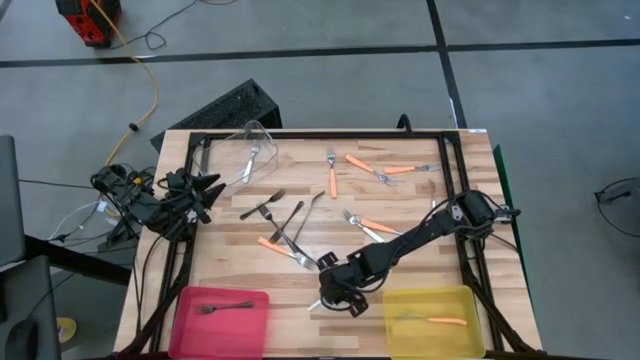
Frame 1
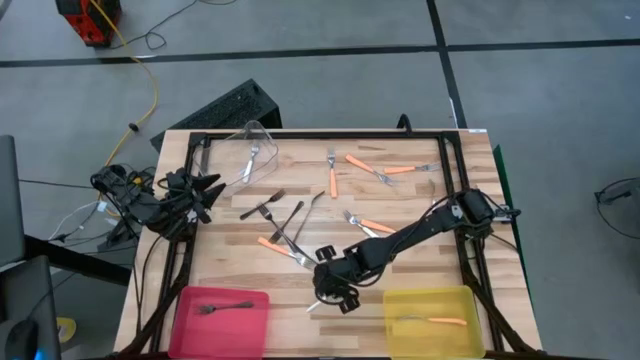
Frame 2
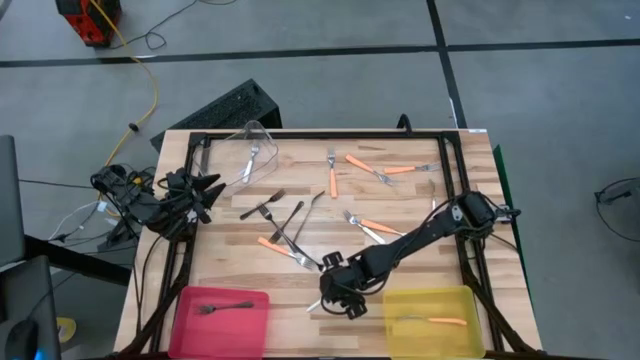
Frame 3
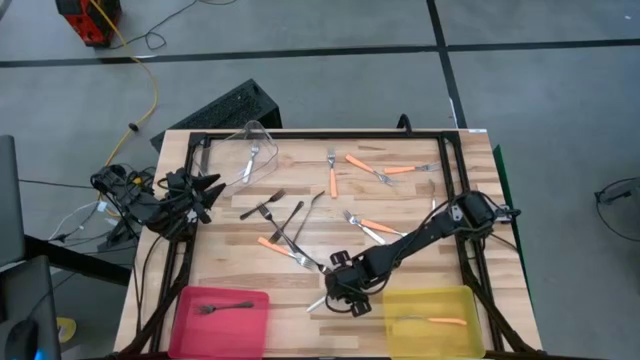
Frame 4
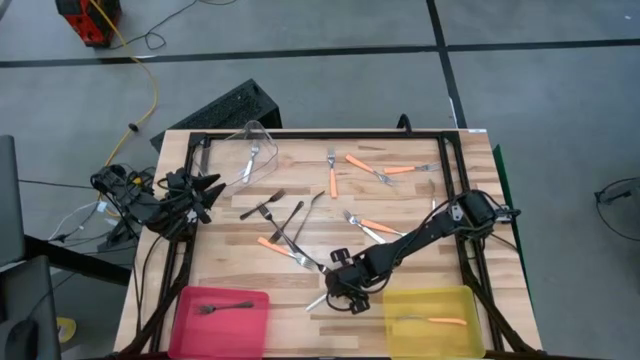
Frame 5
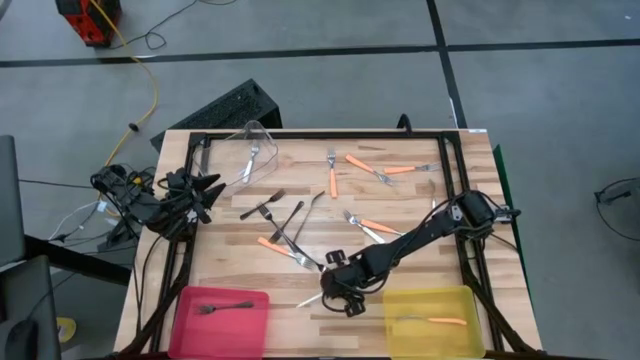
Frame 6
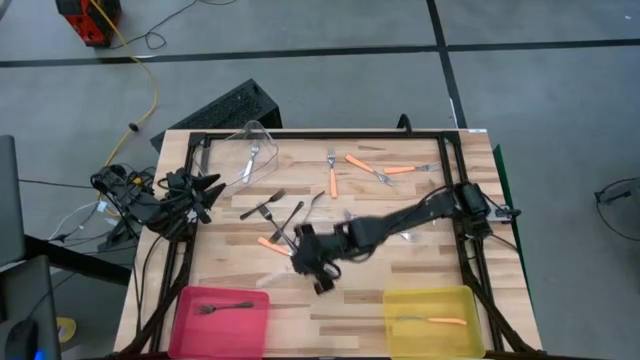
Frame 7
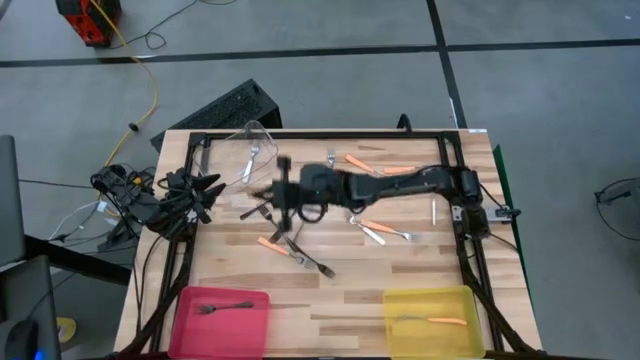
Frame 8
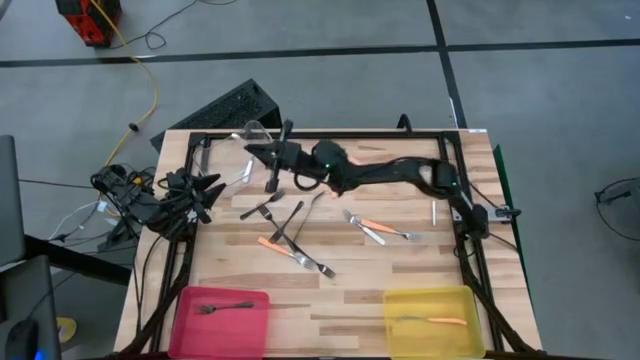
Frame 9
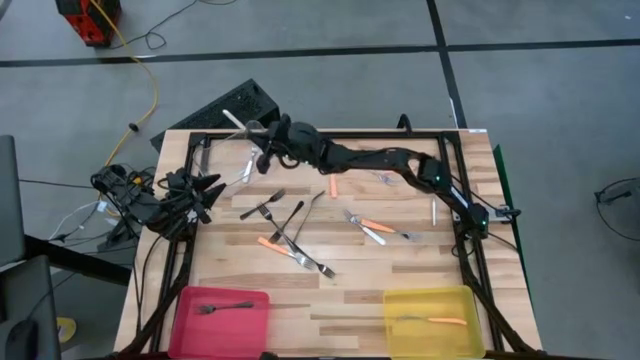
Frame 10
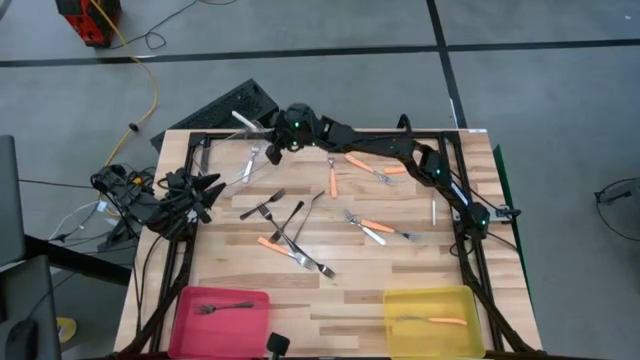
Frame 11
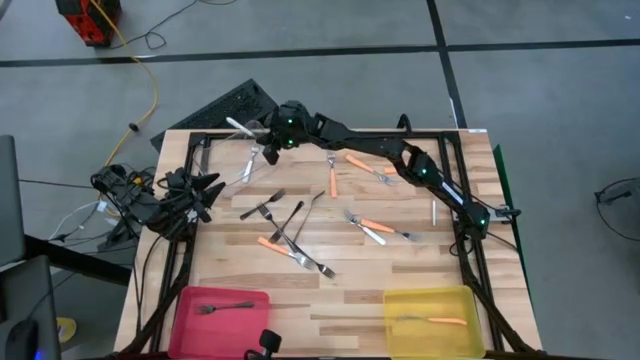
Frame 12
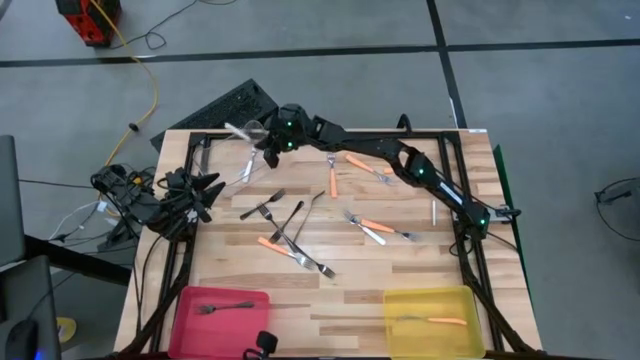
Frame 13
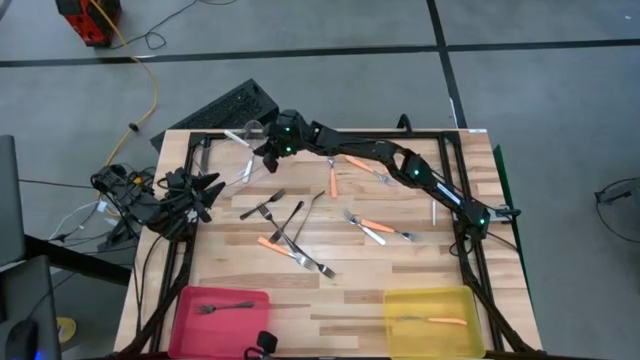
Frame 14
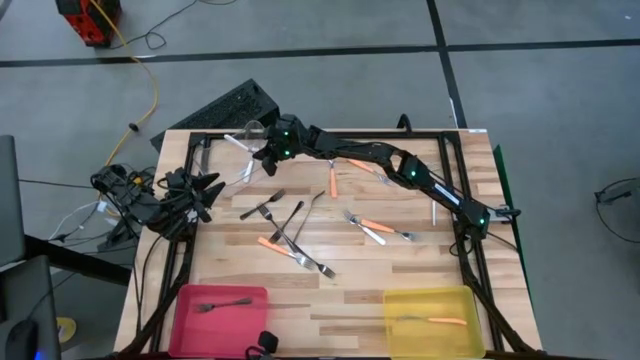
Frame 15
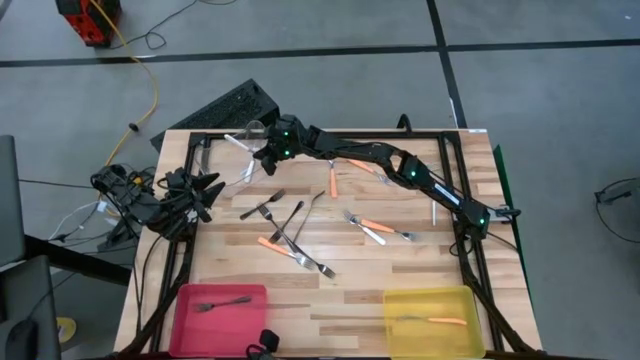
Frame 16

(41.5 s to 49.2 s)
Task: Sort silverware by color (type)
Put the white fork into the transparent bin

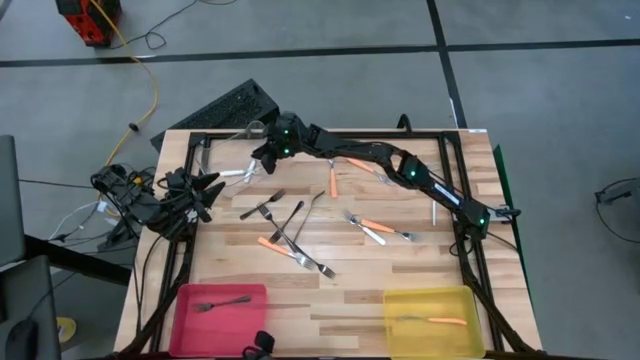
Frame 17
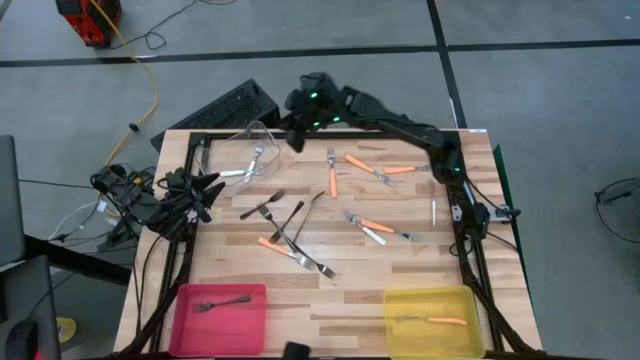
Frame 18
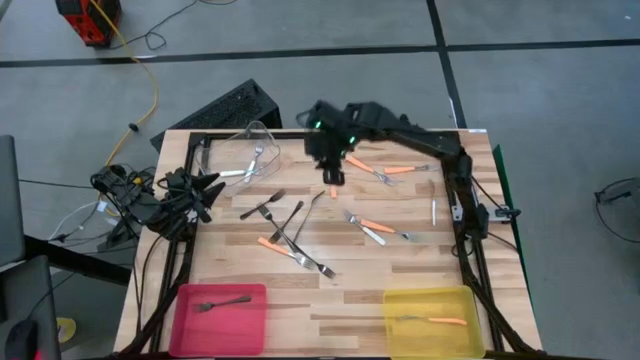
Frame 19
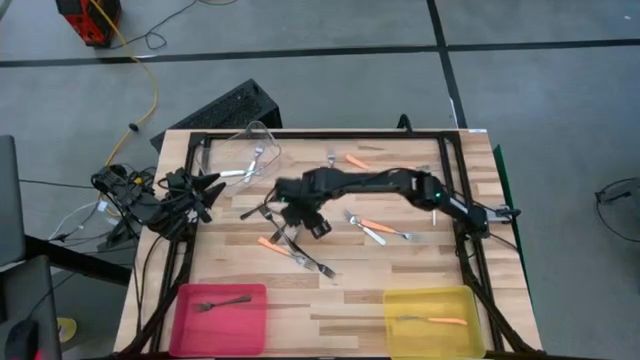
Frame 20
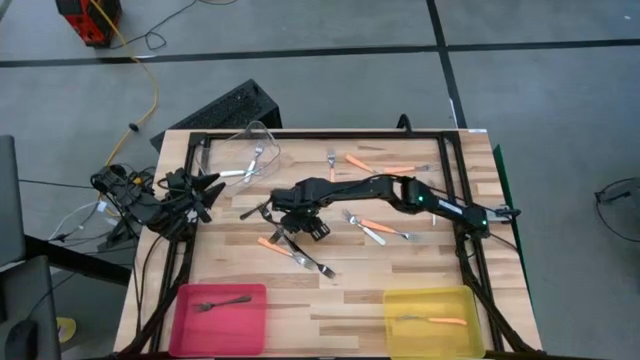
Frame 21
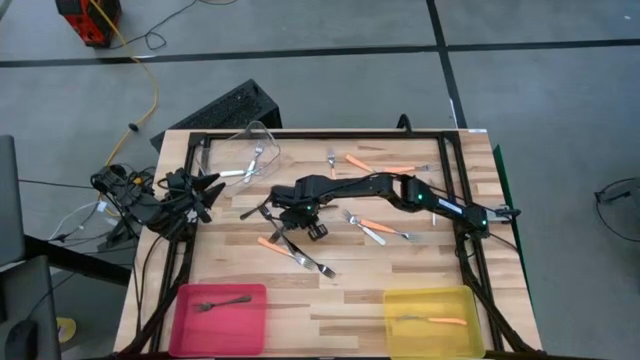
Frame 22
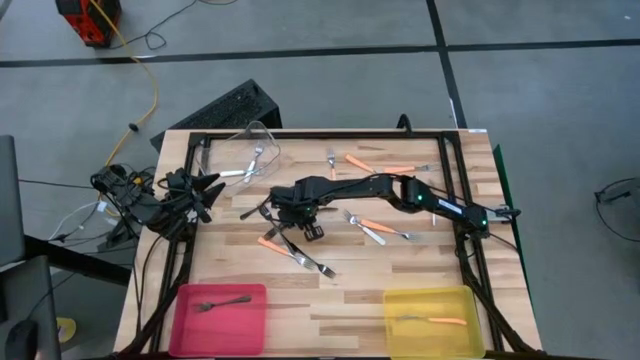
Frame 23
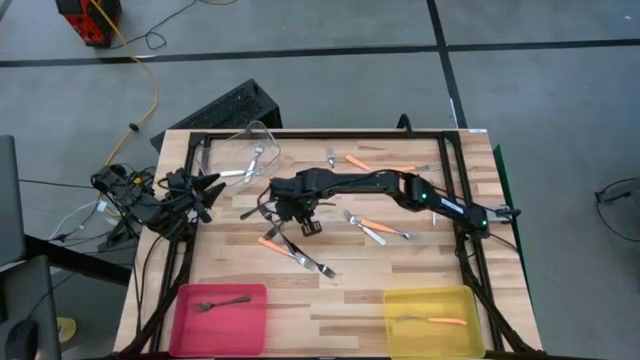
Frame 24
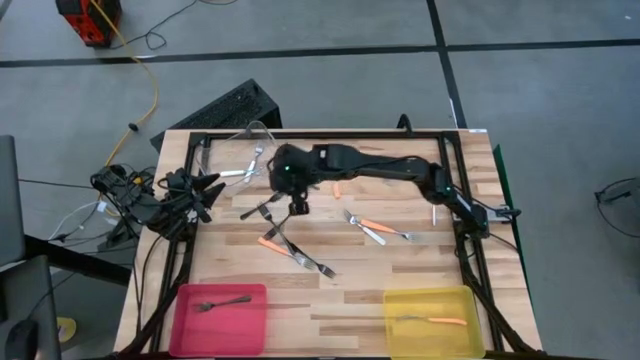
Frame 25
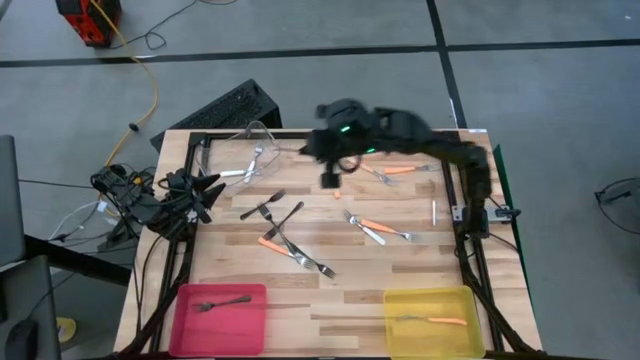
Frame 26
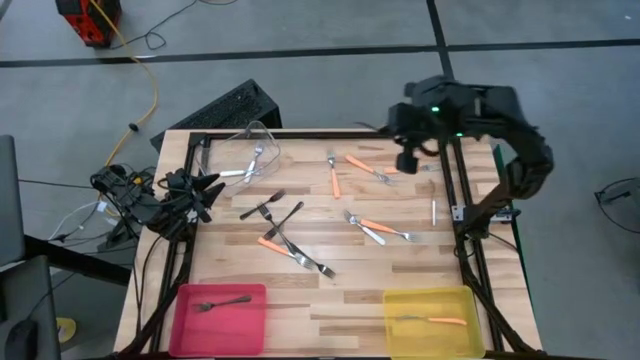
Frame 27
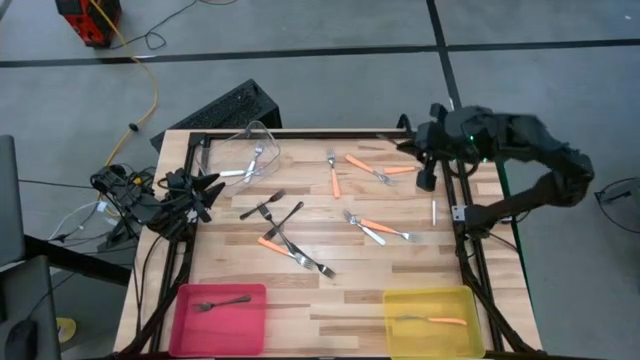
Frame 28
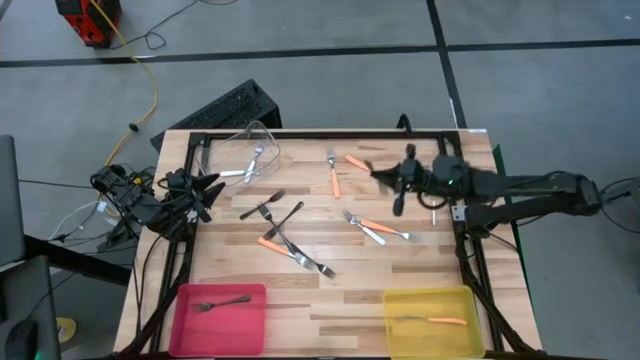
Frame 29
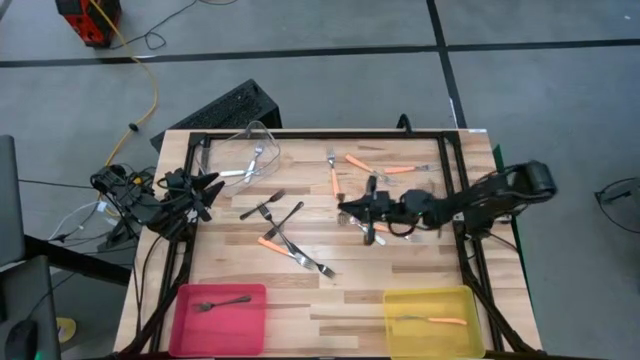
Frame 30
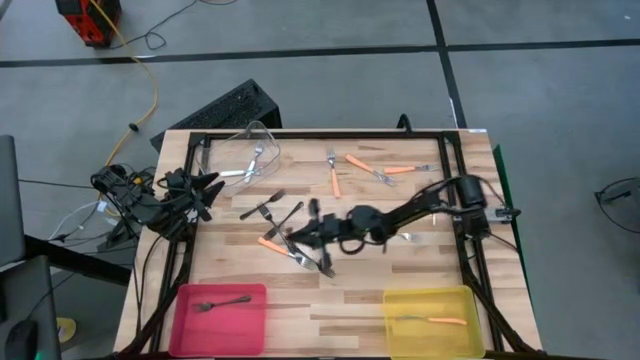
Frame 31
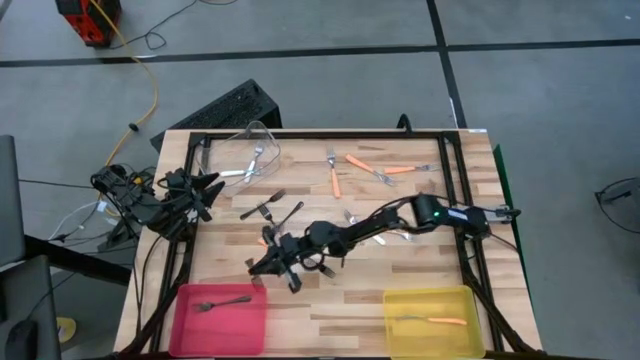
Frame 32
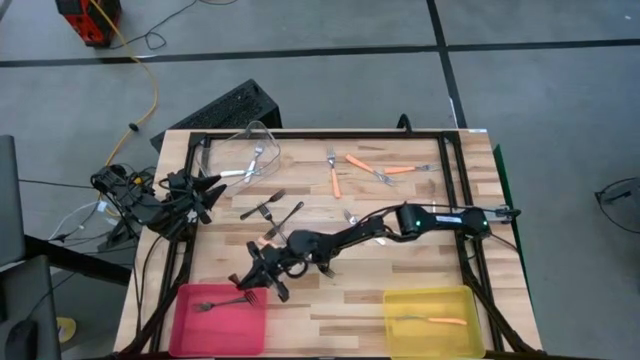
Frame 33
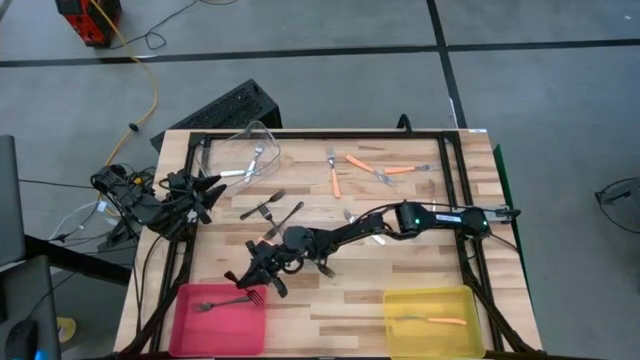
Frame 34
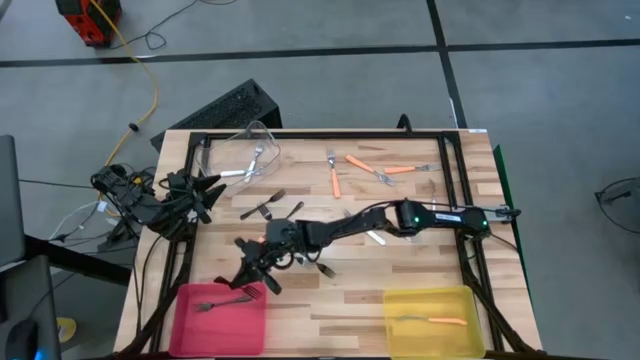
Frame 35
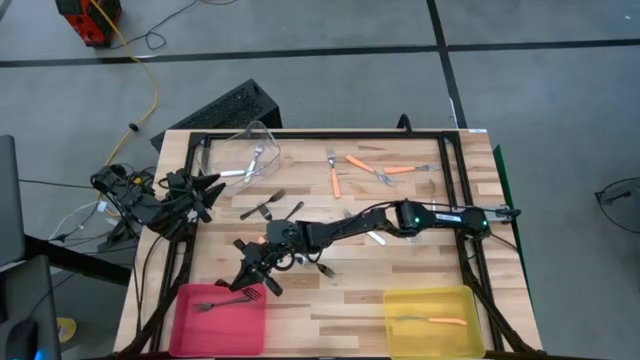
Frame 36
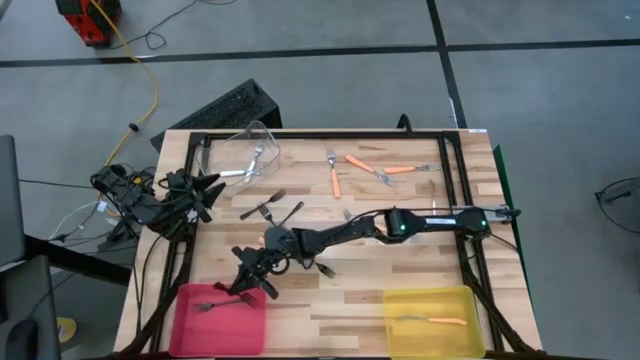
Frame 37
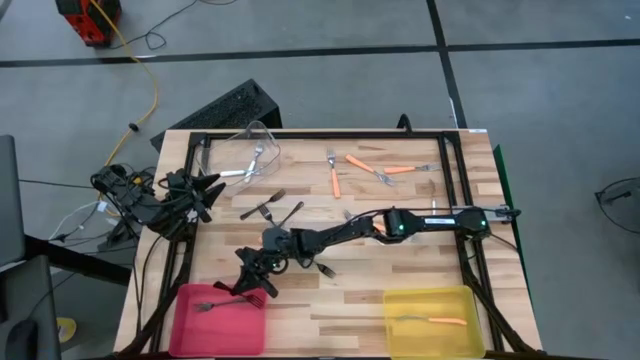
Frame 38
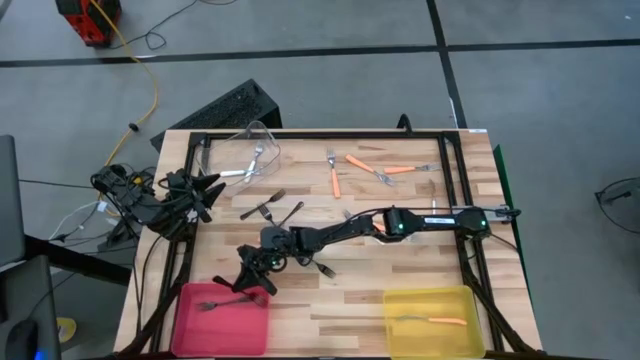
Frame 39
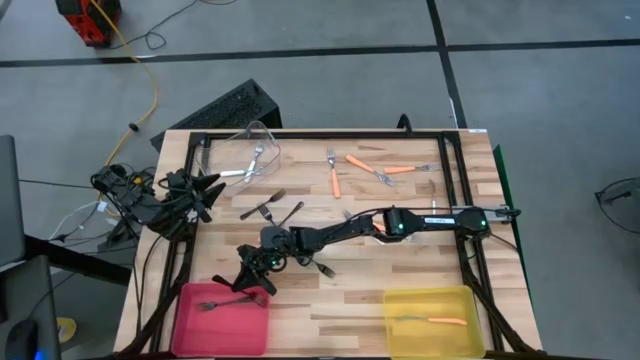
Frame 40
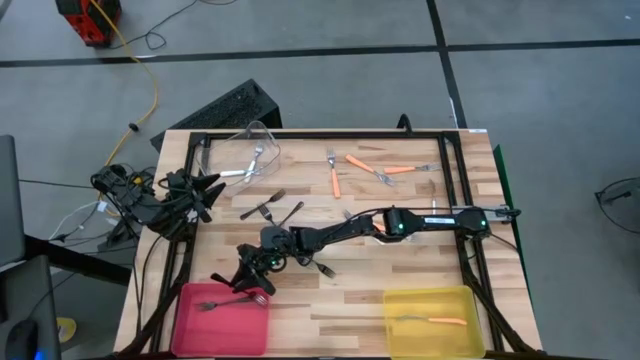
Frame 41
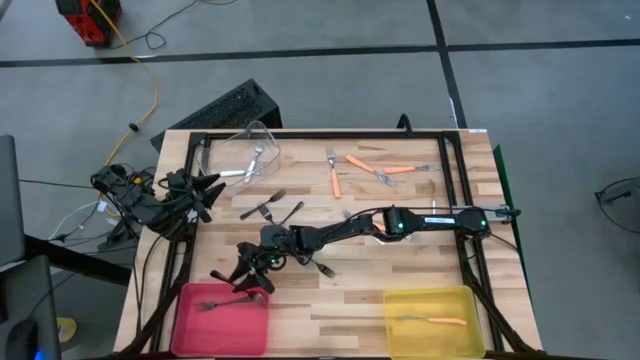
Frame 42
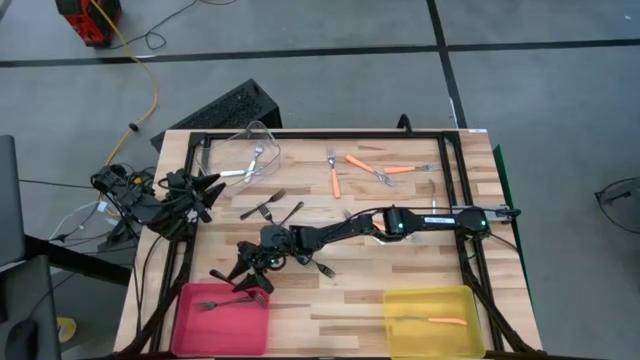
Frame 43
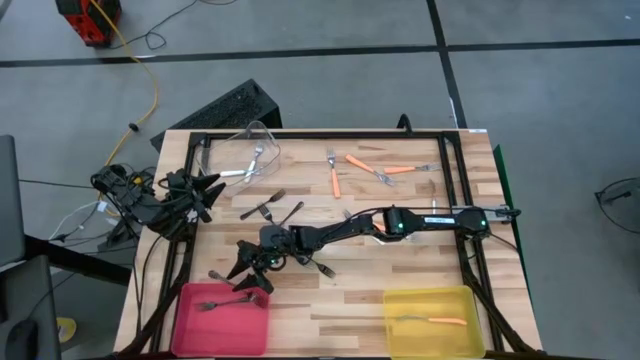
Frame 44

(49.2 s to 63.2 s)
Put the black fork into the red bin
